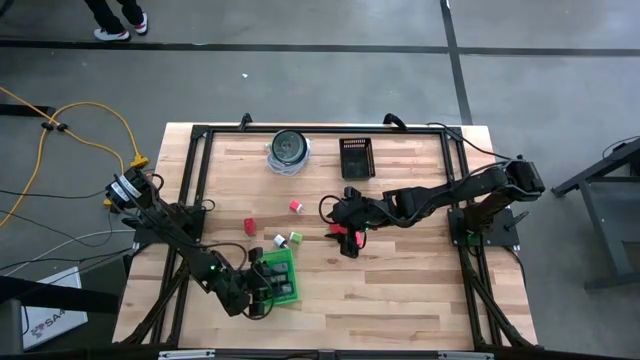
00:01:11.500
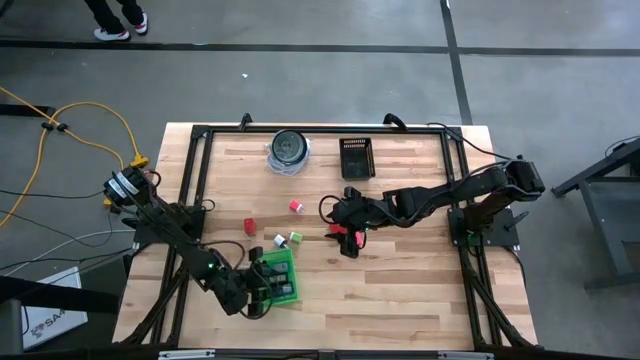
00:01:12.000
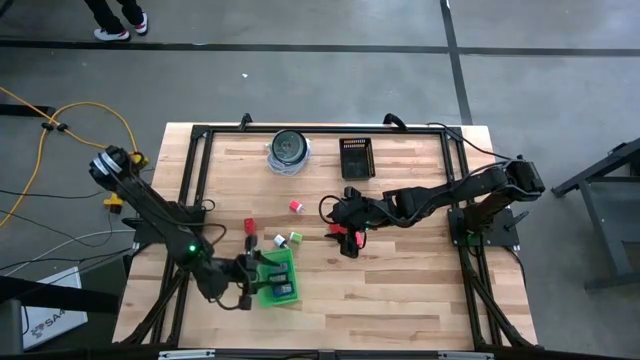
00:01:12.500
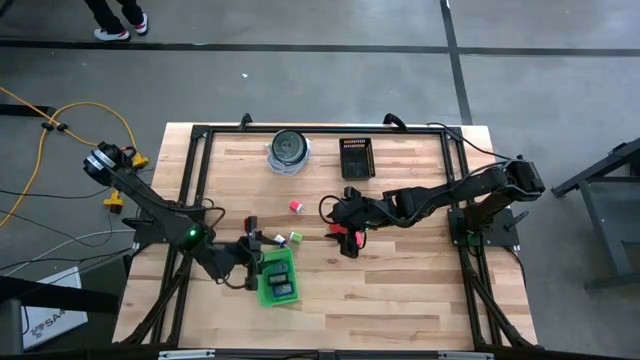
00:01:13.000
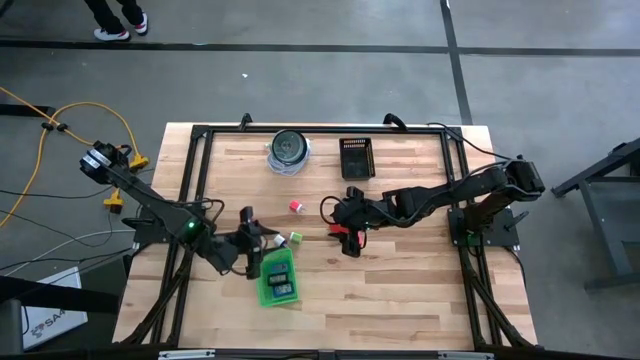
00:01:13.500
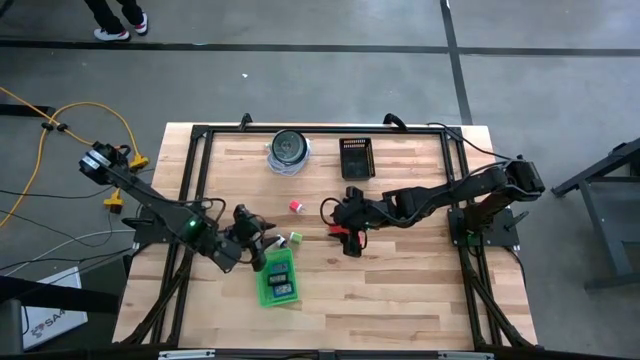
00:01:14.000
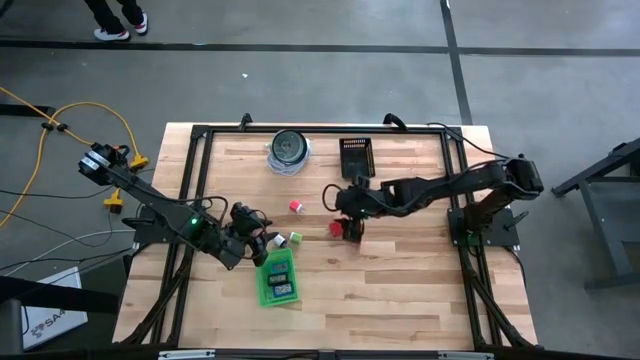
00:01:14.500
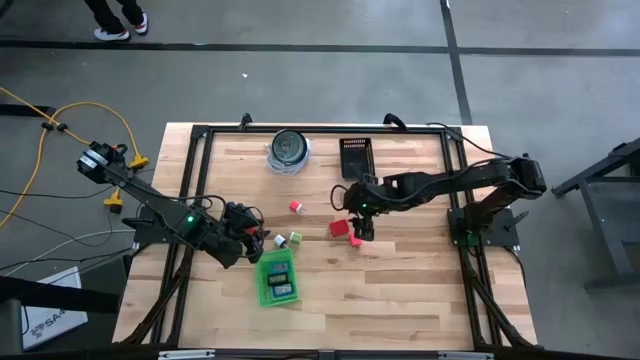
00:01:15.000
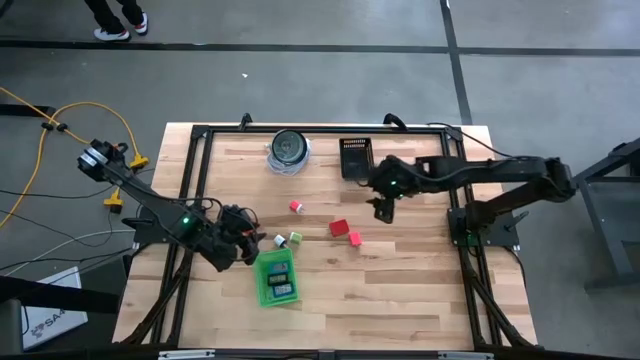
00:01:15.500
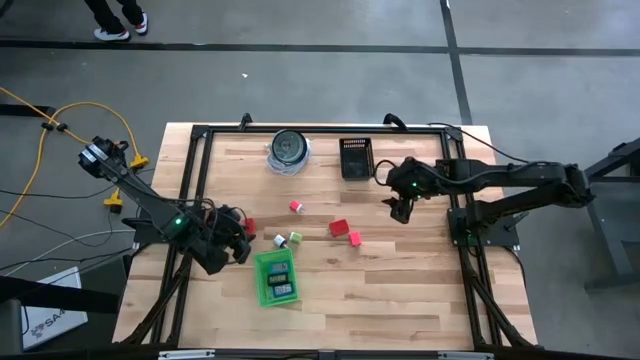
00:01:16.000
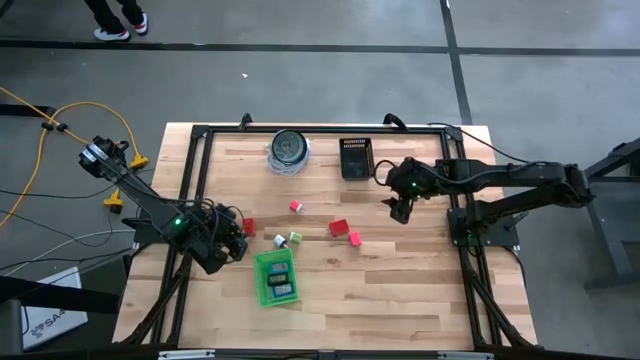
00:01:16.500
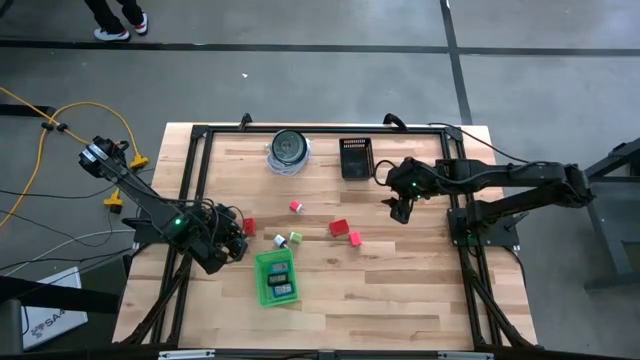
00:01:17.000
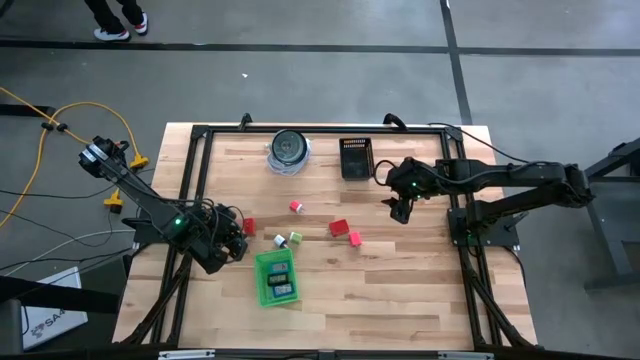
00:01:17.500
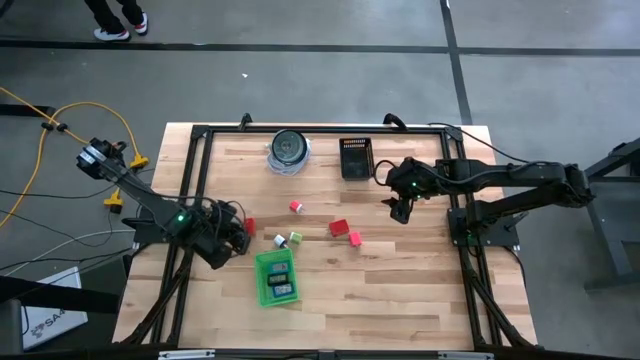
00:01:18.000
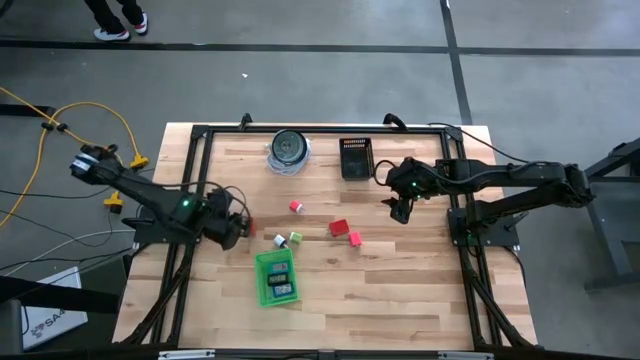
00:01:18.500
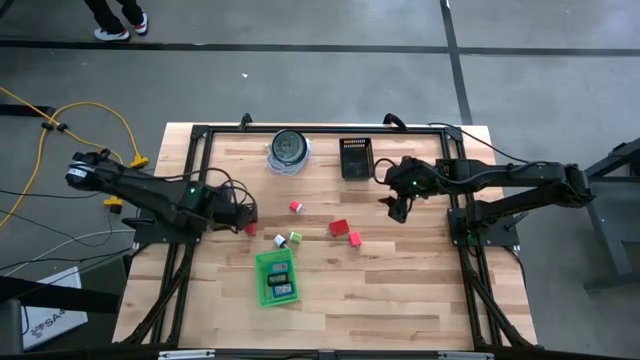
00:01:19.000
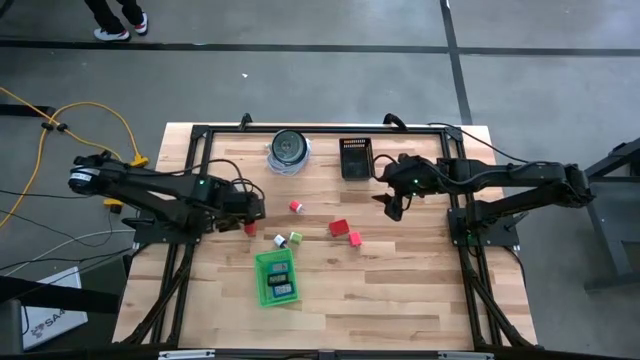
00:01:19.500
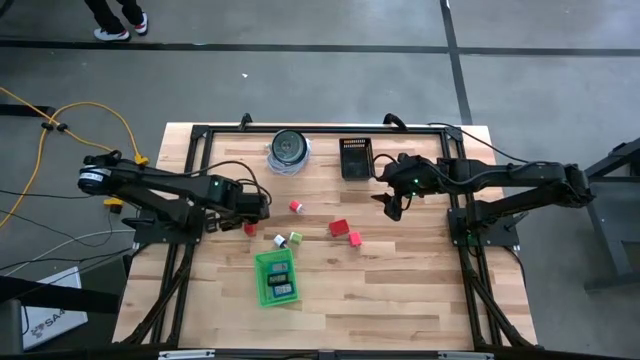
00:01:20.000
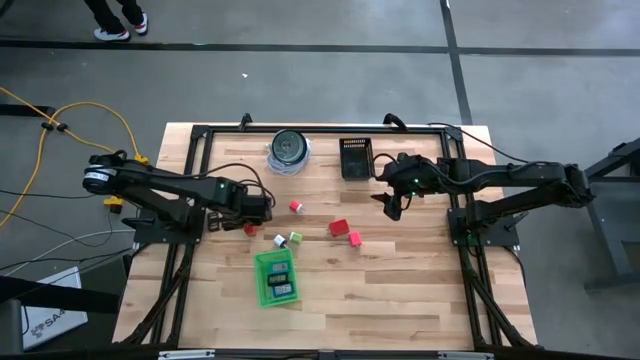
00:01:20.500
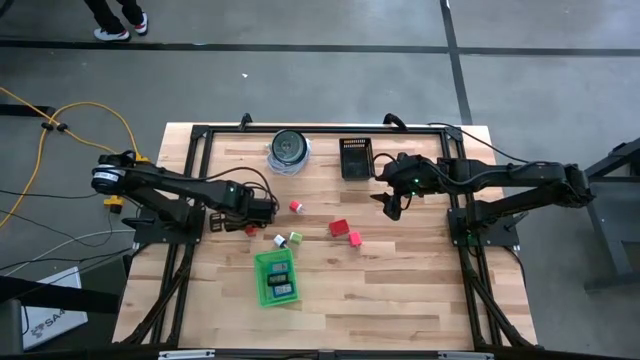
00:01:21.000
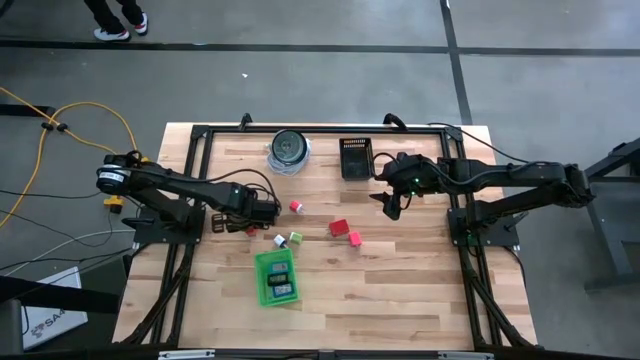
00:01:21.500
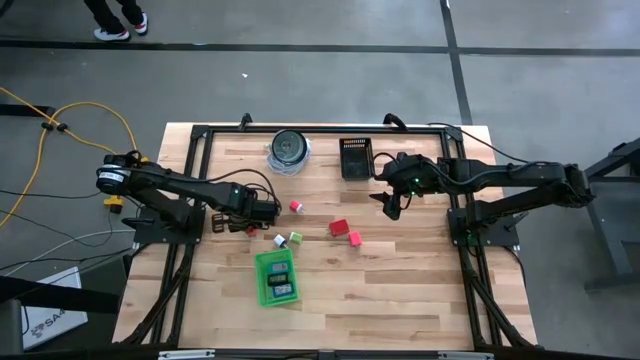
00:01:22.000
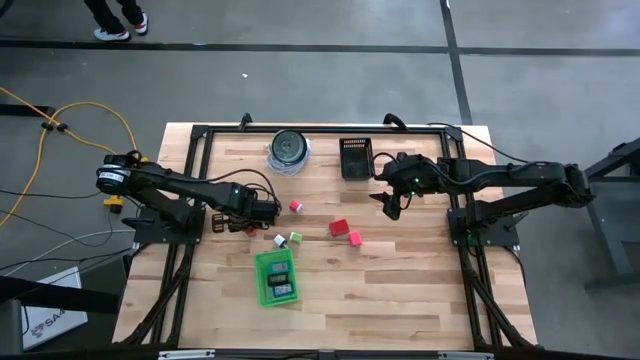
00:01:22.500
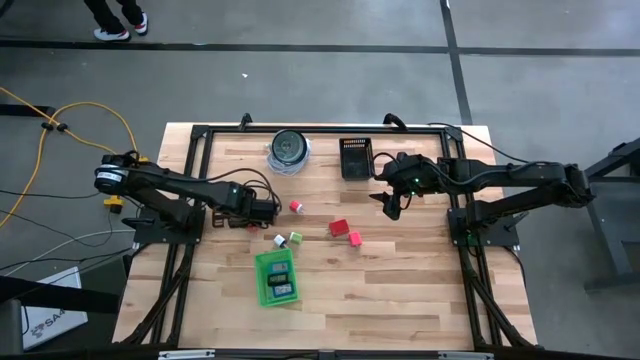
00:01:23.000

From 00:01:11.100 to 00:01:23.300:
Task: Pick & Place Office items
Put the left red charger adapter into the black bin

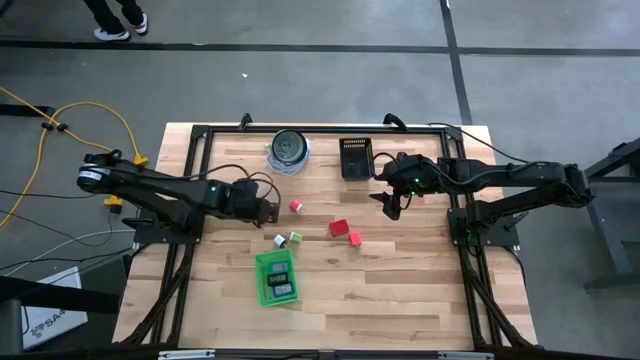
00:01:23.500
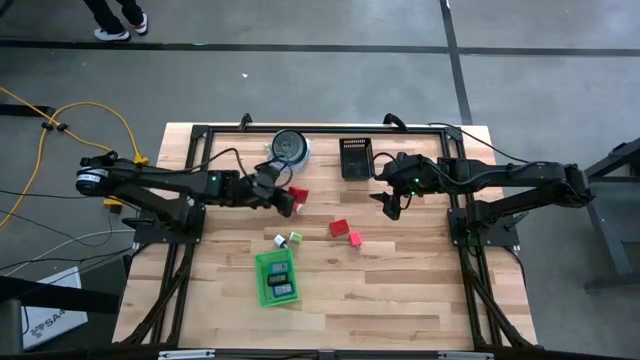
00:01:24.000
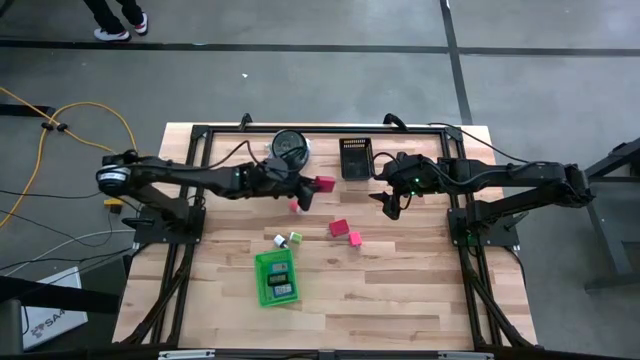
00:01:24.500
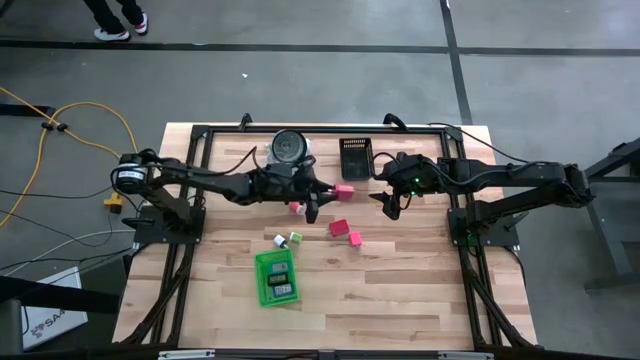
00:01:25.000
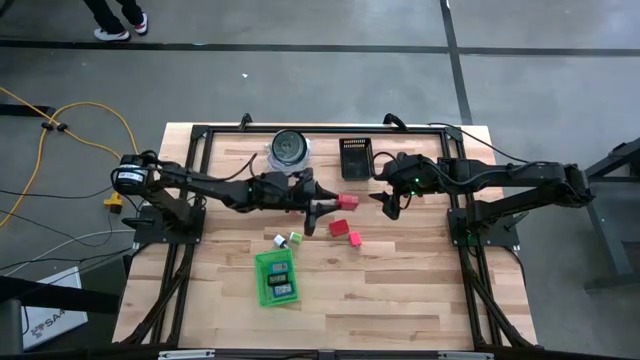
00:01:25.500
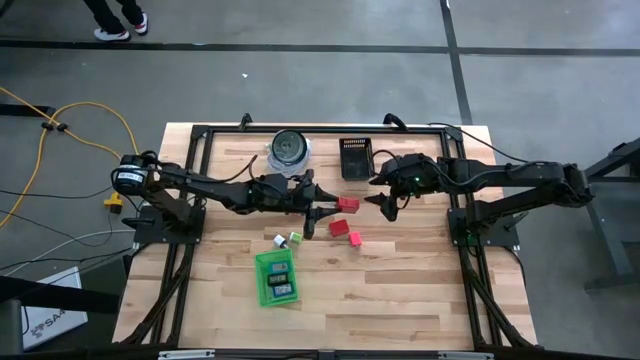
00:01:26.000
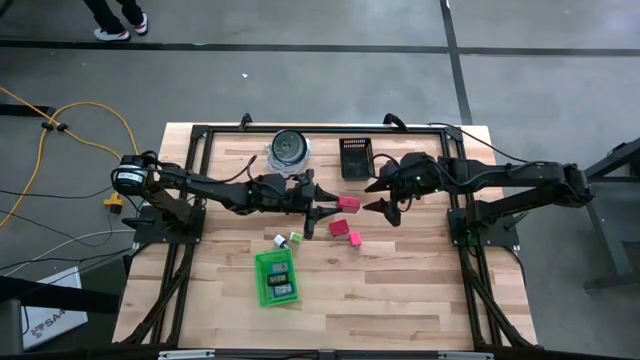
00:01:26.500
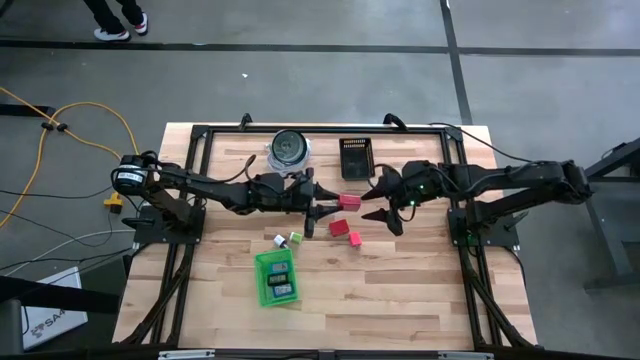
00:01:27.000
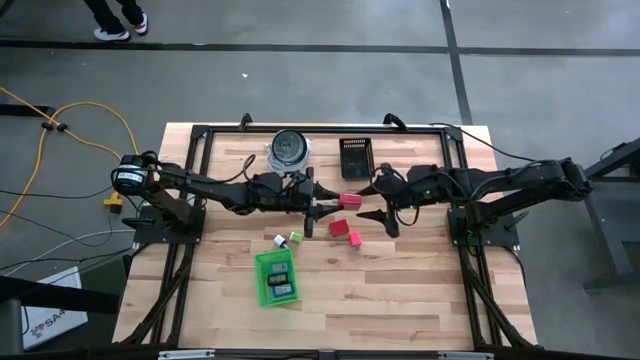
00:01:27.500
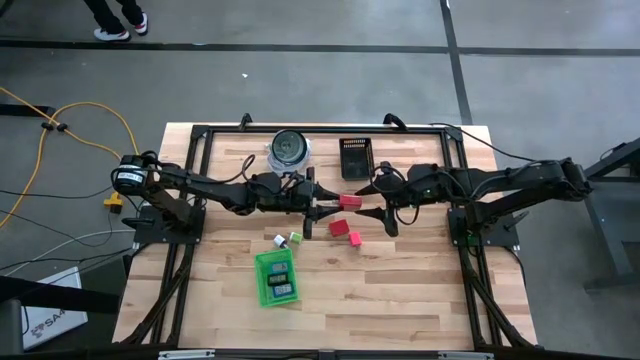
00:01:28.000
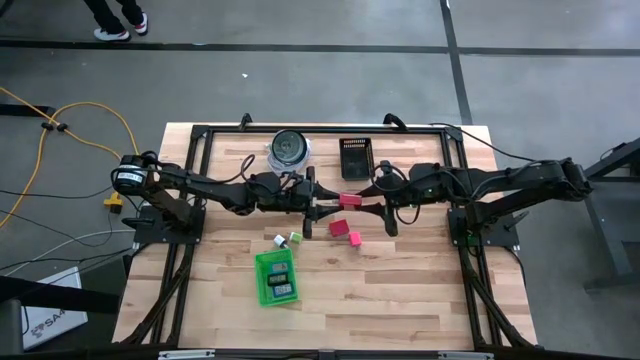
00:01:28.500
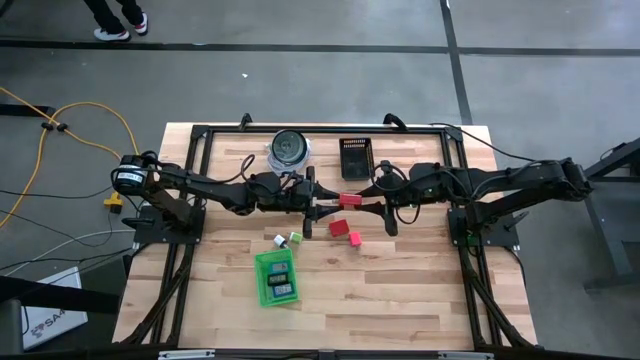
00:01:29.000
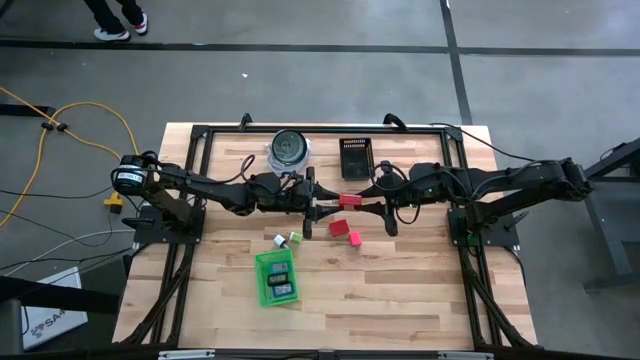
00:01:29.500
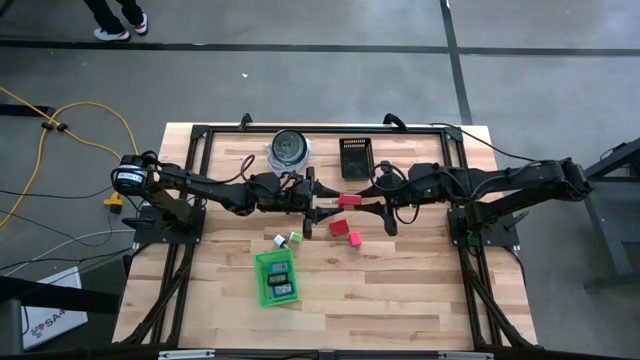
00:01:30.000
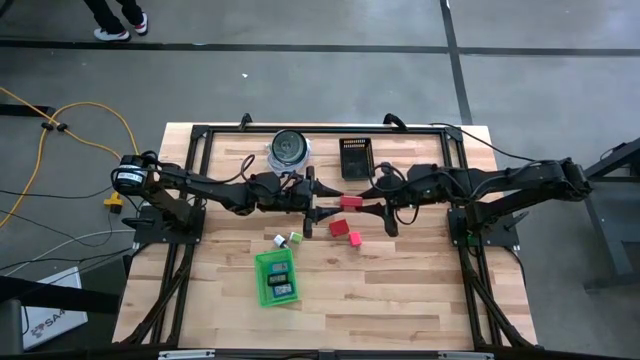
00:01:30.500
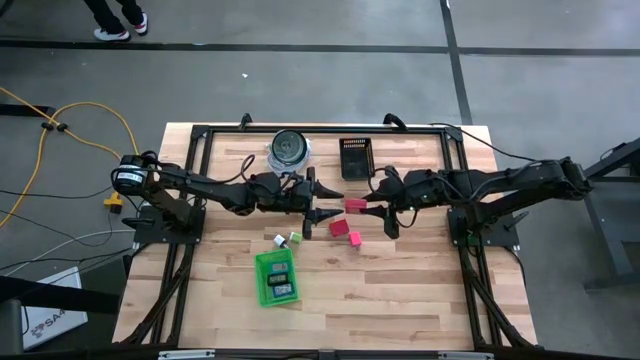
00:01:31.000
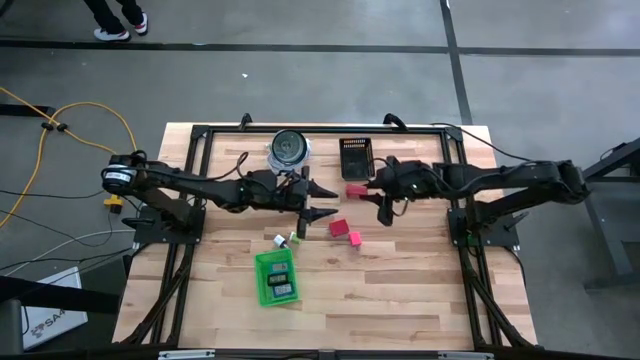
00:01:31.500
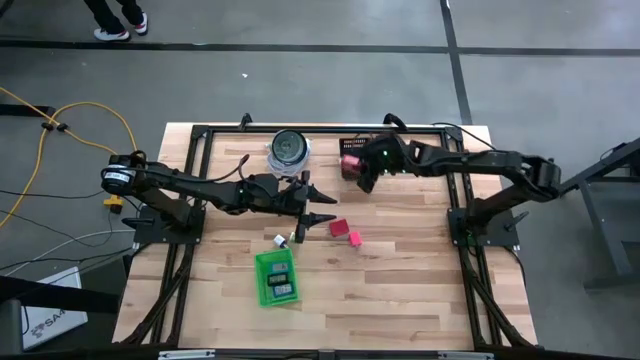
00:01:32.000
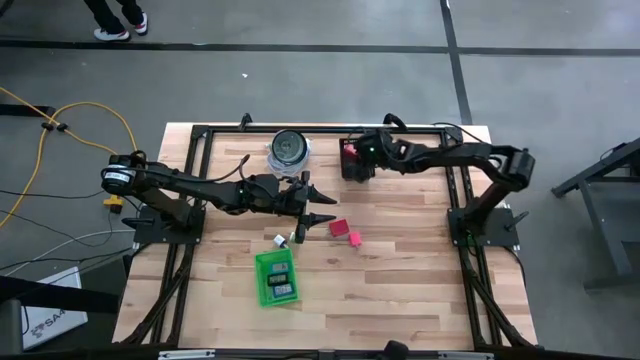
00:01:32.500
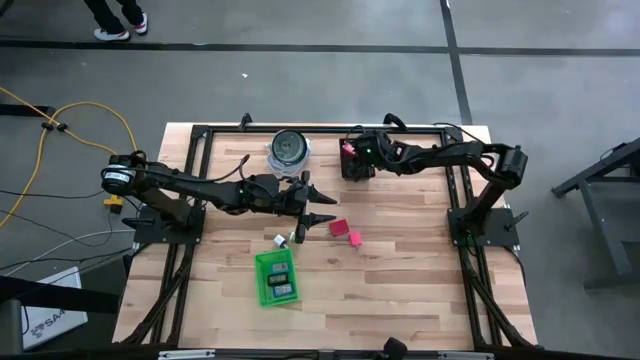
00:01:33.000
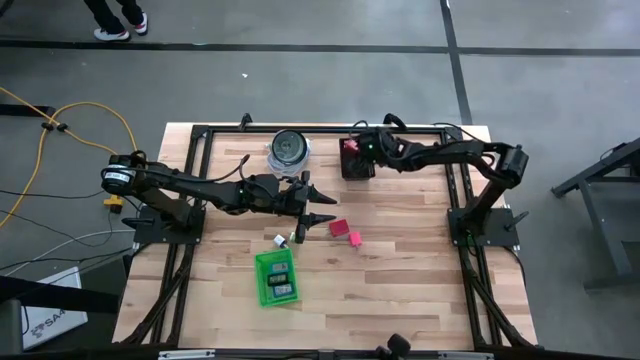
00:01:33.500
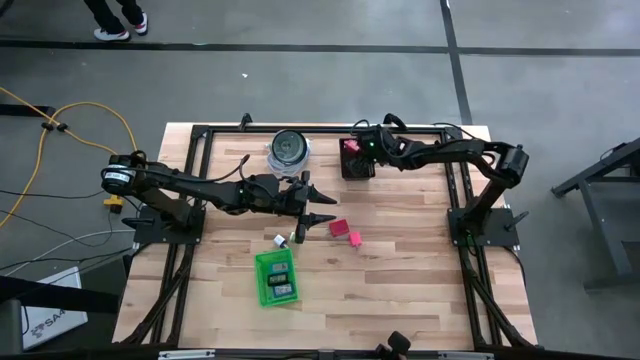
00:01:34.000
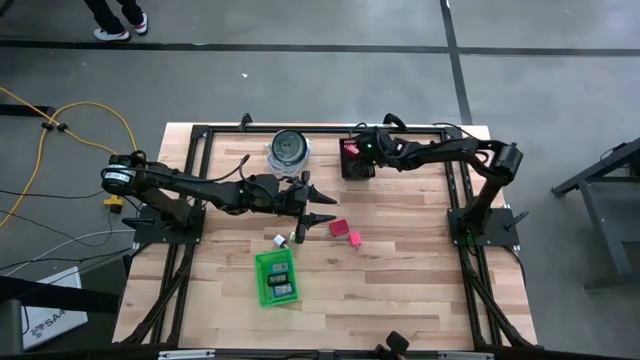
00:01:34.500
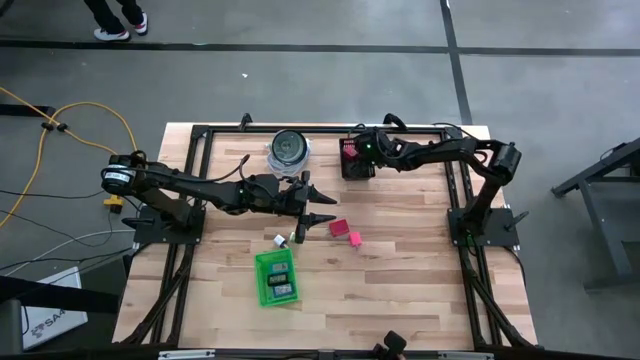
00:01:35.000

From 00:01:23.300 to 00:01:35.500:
Put the left red charger adapter into the black bin
